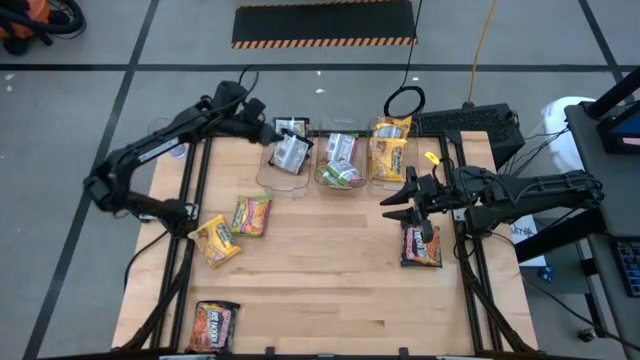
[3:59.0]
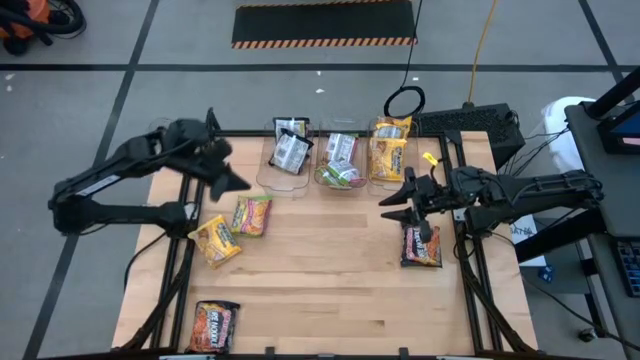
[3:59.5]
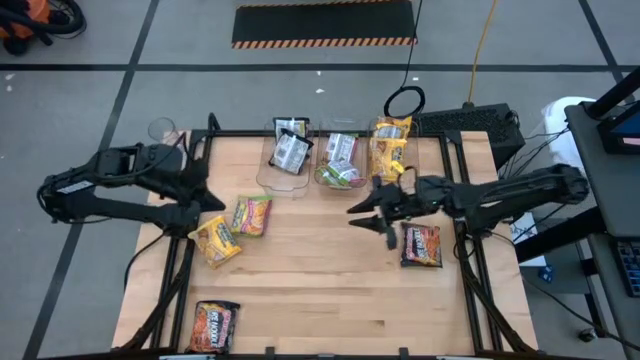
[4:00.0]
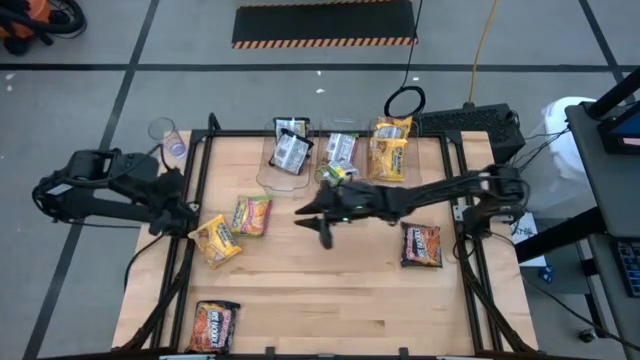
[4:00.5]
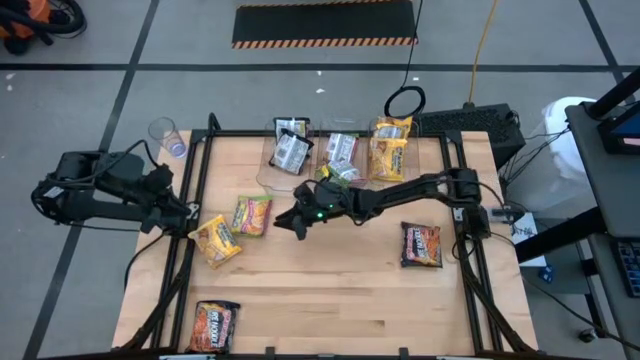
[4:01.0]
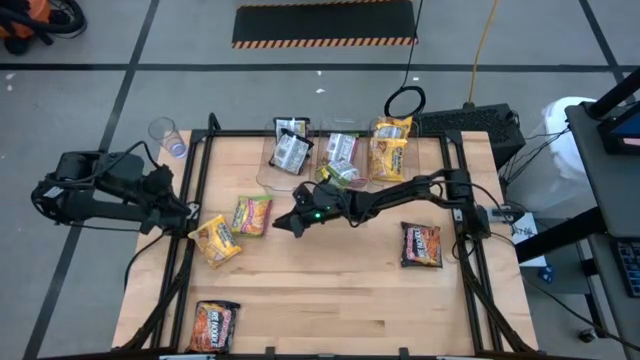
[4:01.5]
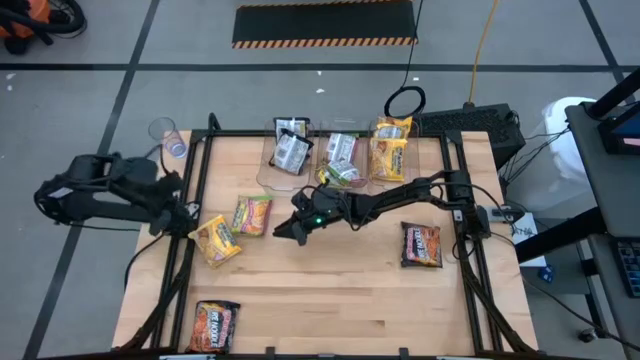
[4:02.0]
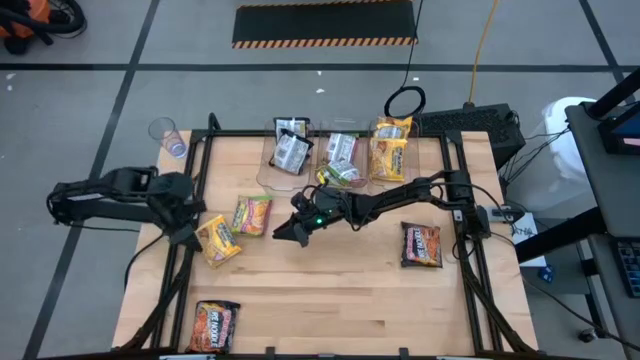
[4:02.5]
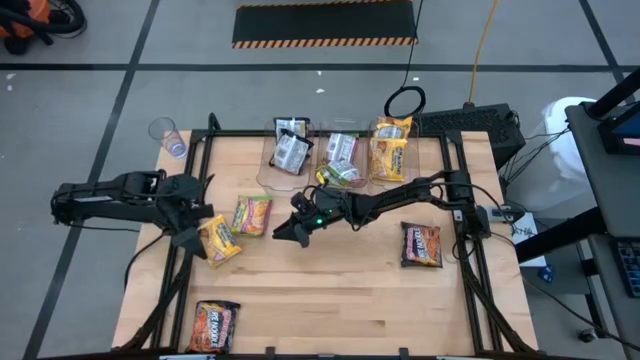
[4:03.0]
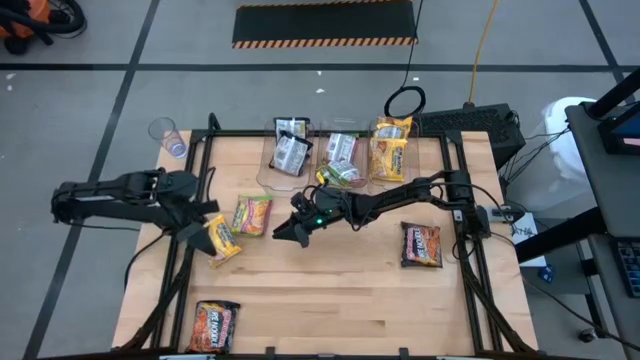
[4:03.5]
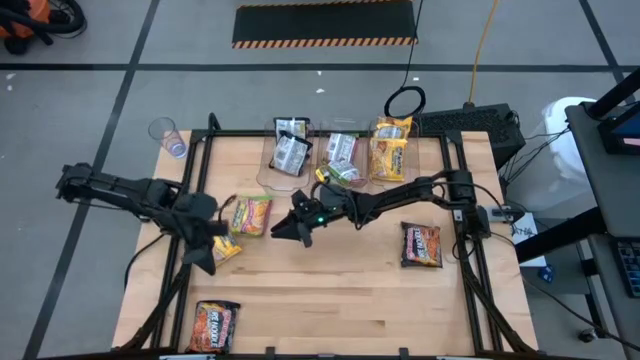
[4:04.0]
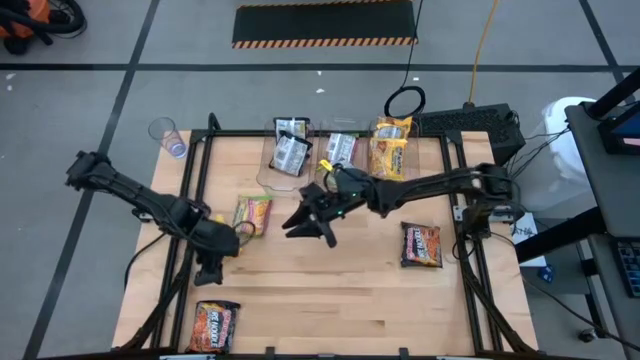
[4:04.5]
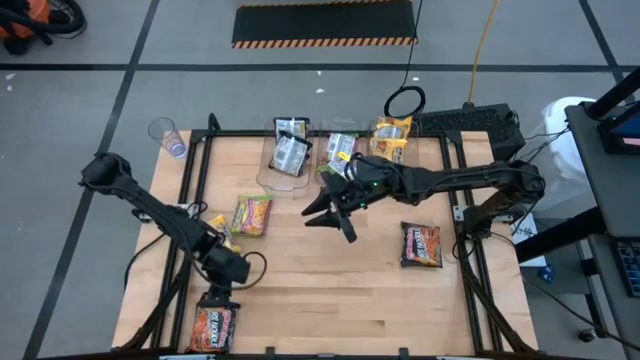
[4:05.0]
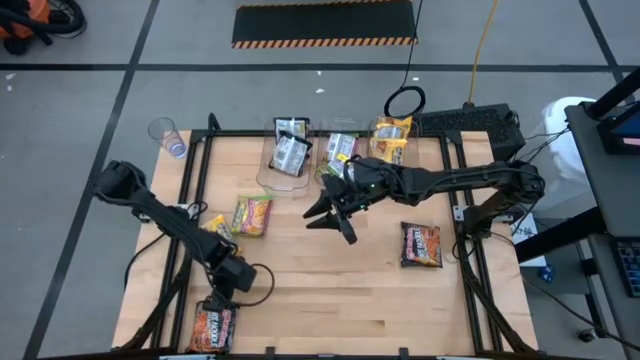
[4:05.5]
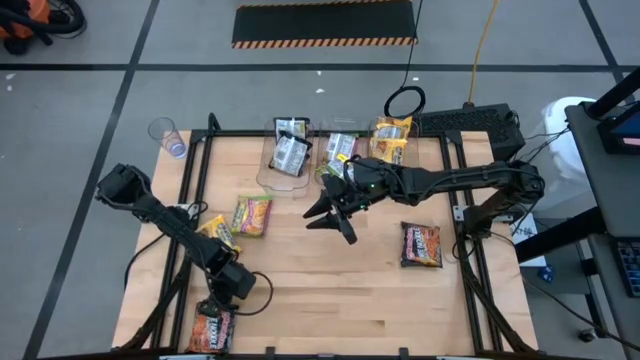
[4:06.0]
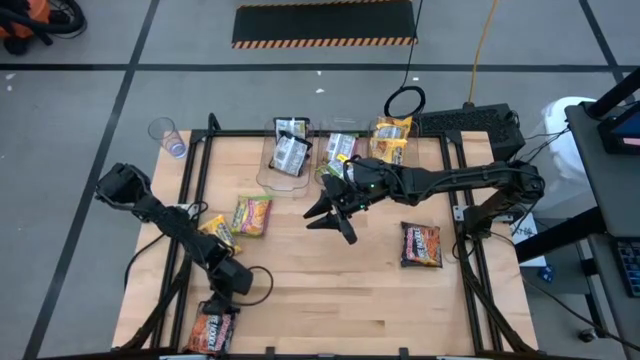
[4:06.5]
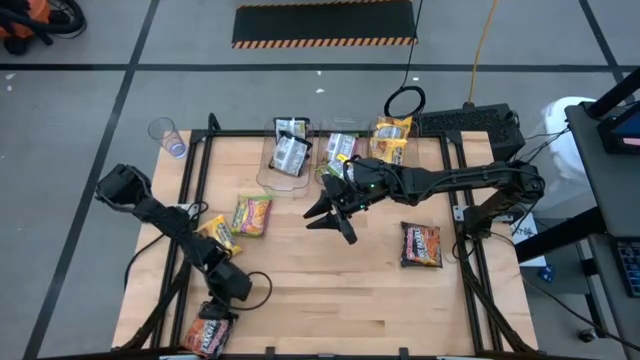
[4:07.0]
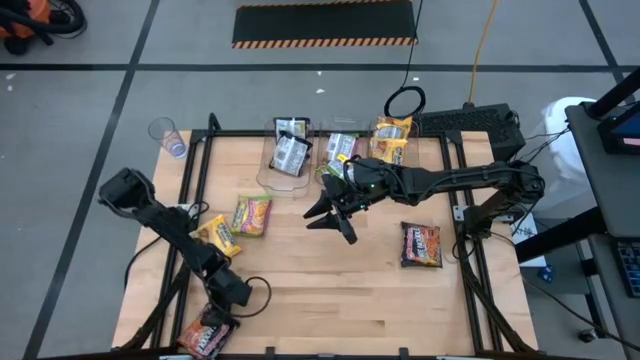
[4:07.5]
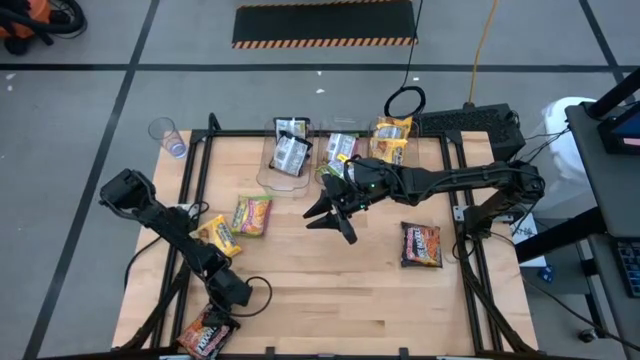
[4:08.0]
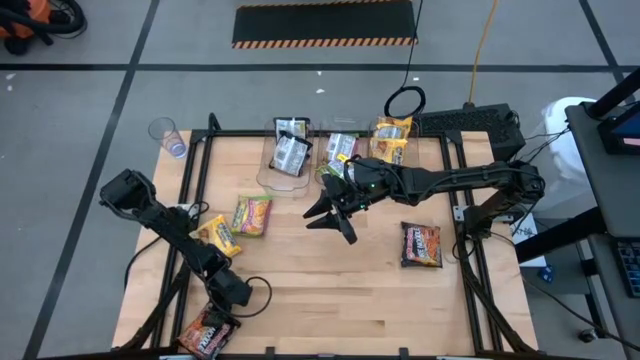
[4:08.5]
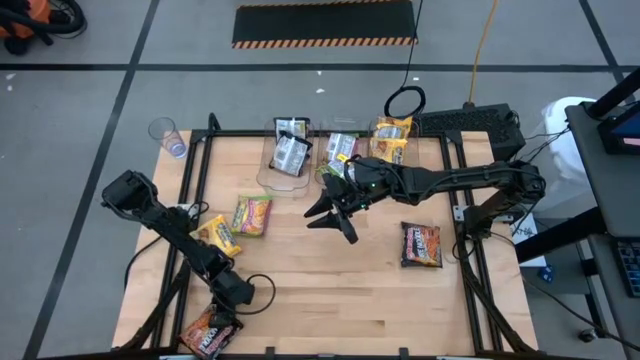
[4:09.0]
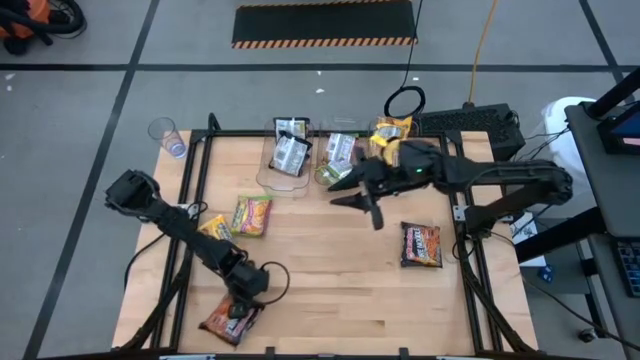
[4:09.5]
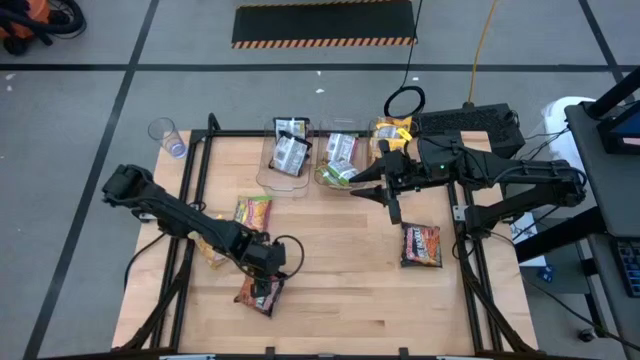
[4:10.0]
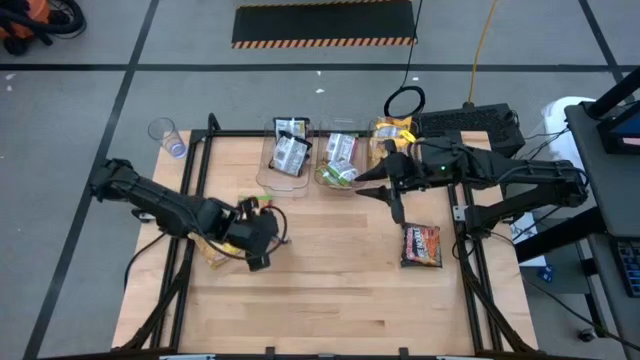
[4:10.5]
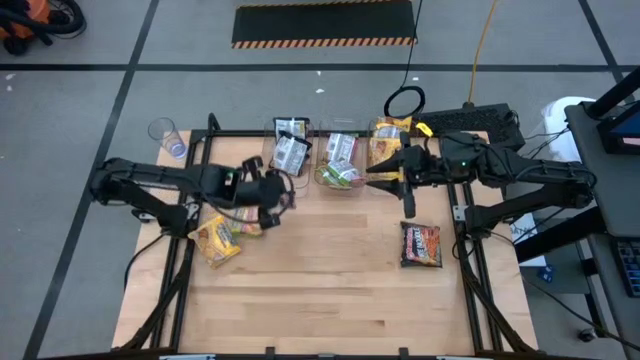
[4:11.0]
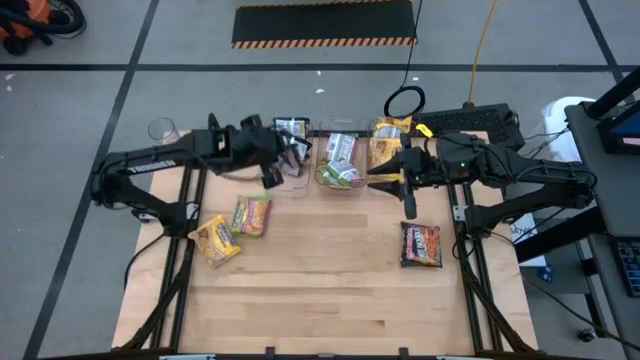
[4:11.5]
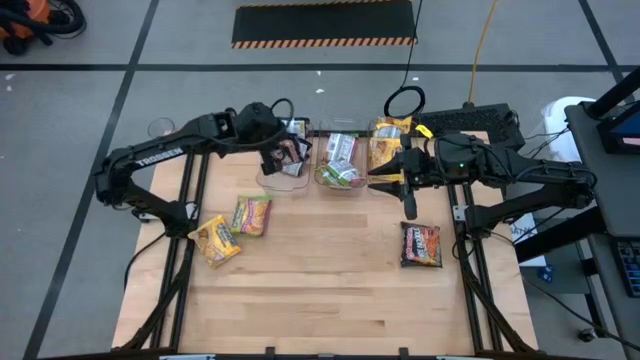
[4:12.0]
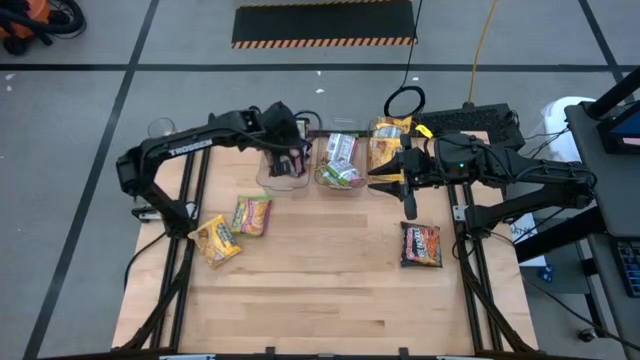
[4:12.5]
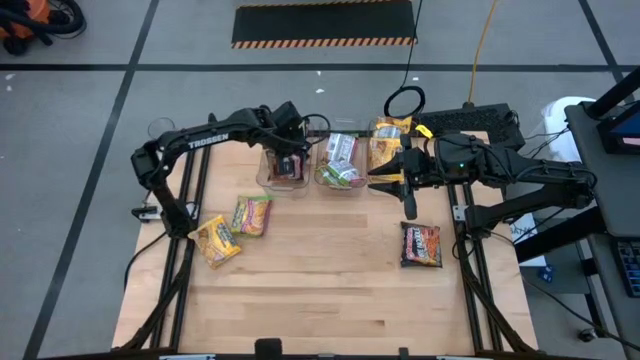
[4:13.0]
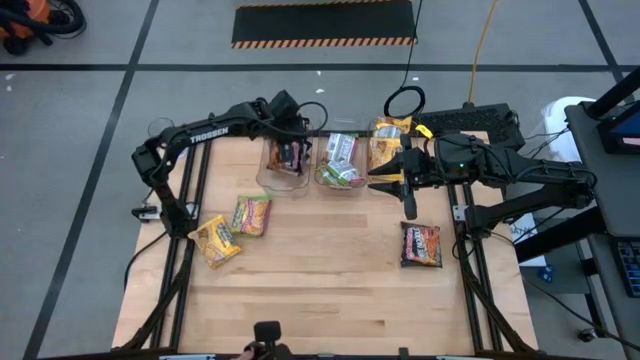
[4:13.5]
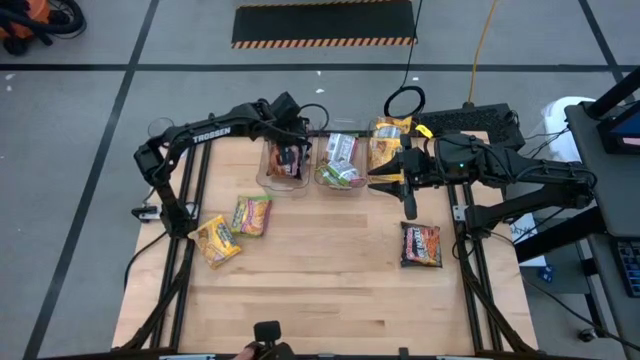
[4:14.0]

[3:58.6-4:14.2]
Task: Sort Maruchan noodles
Put the black noodle pack into the left transparent bin

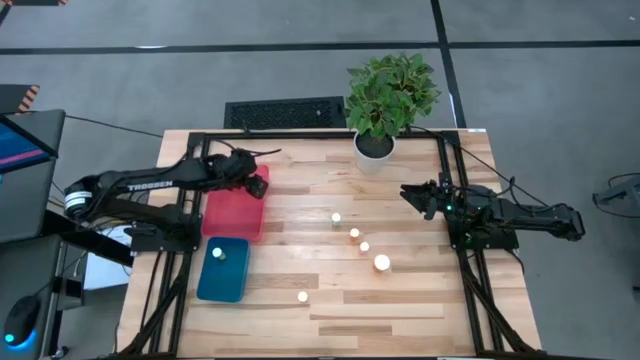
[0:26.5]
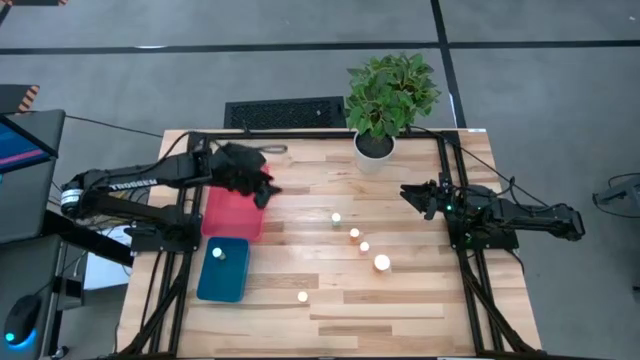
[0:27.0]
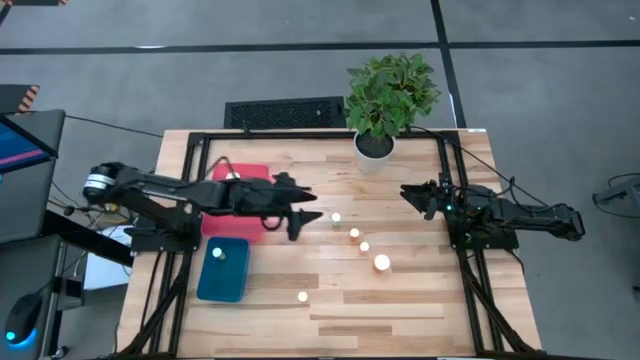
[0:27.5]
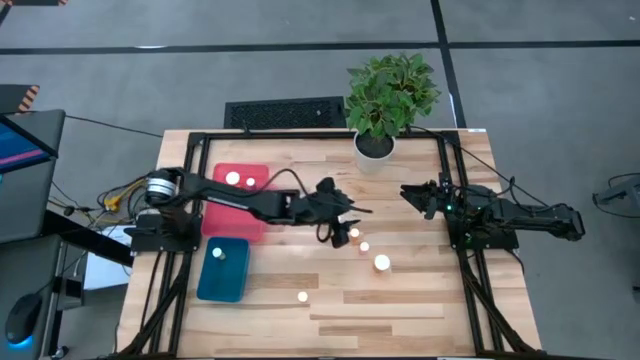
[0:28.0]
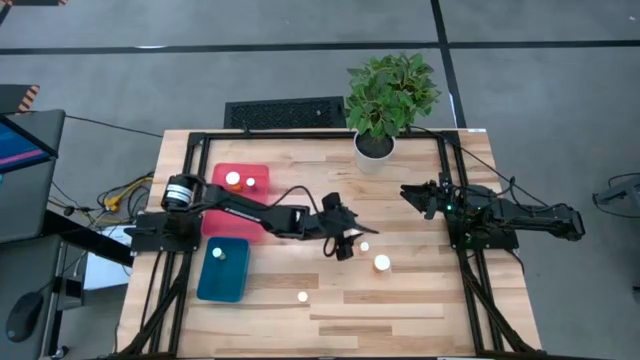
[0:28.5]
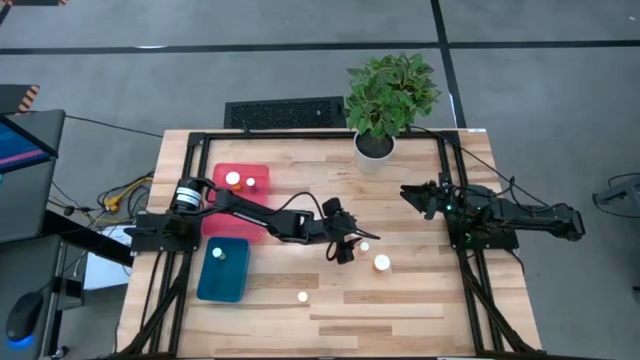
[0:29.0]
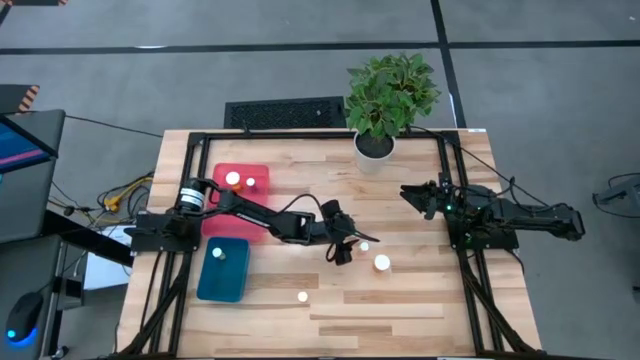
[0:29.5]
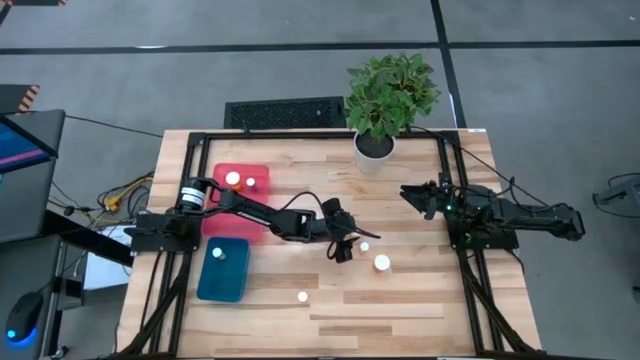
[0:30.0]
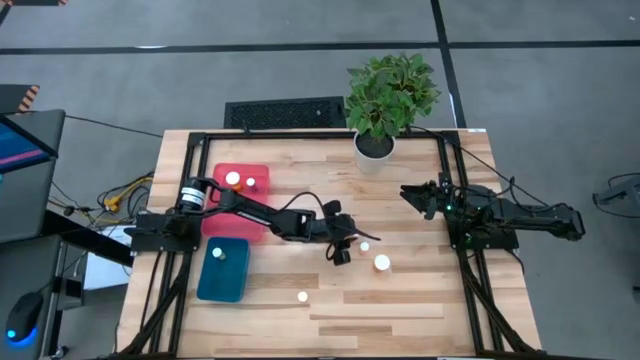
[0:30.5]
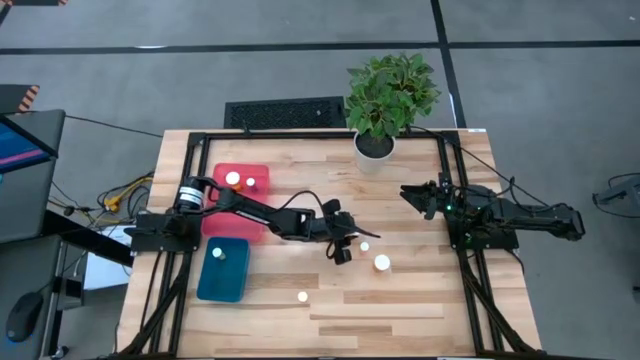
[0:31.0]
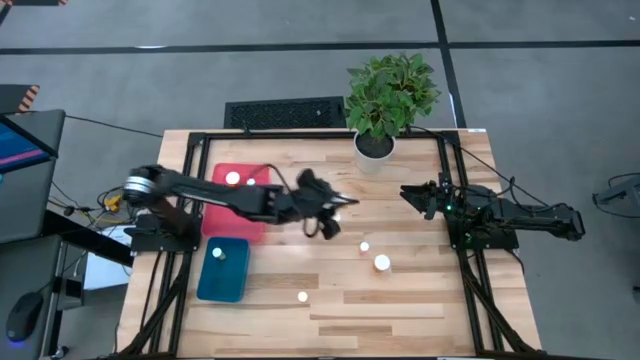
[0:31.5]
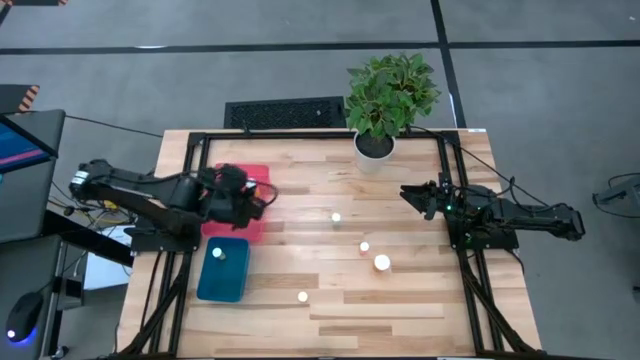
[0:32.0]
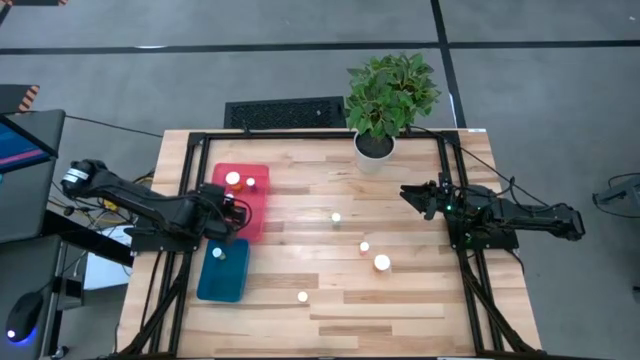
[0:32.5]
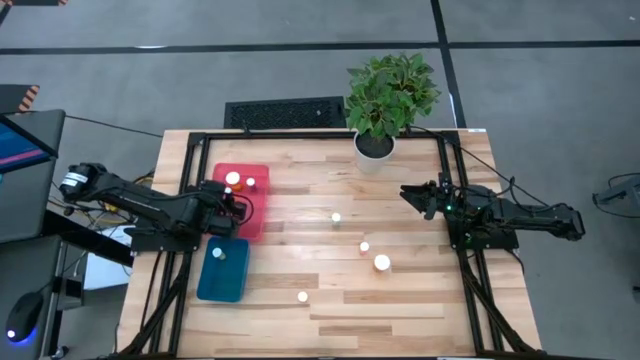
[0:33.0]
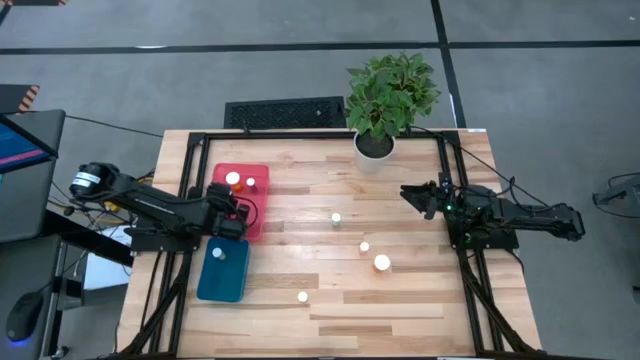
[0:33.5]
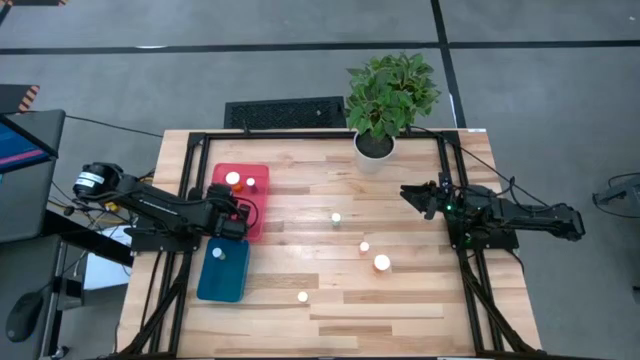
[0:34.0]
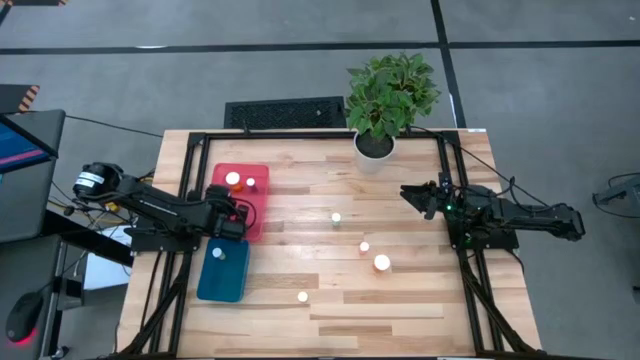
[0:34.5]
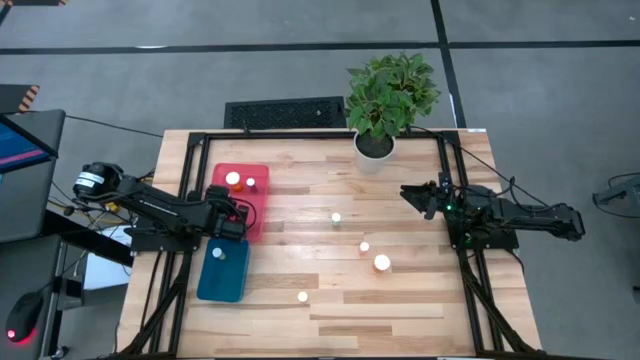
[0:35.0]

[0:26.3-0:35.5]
Task: Pick and place medicine bottles into bin by pill shape (circle, oval)
Put the right orange capsule bottle into the red bin
